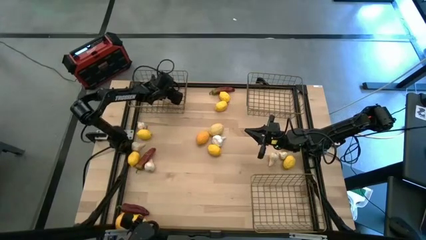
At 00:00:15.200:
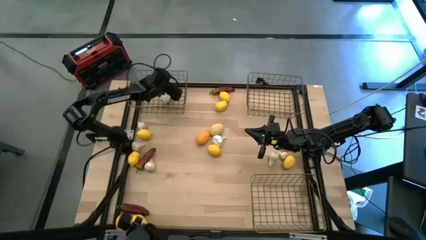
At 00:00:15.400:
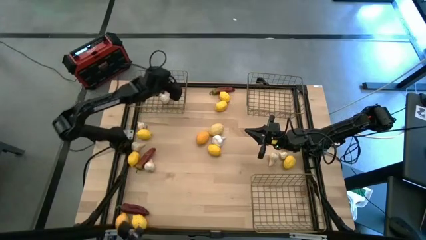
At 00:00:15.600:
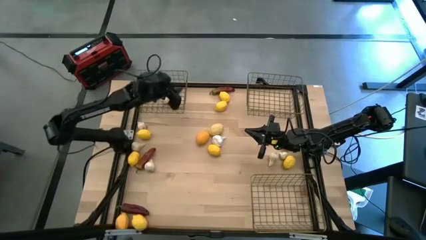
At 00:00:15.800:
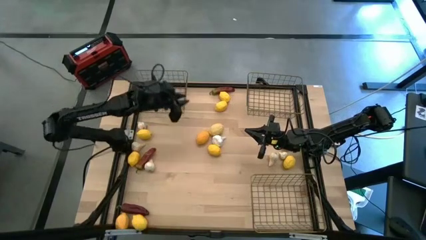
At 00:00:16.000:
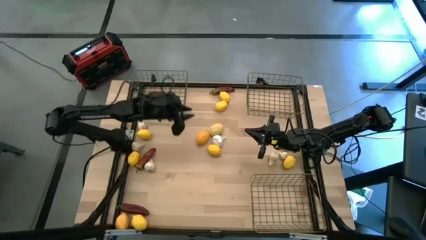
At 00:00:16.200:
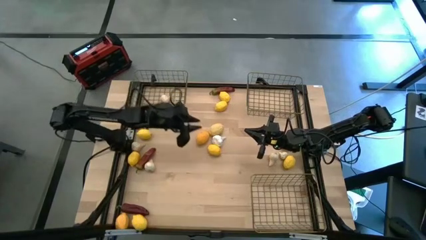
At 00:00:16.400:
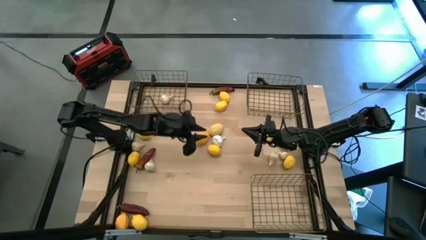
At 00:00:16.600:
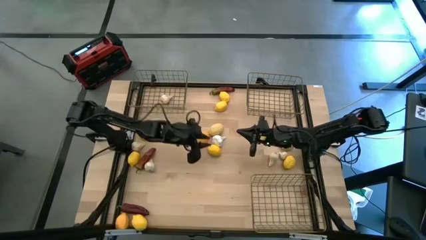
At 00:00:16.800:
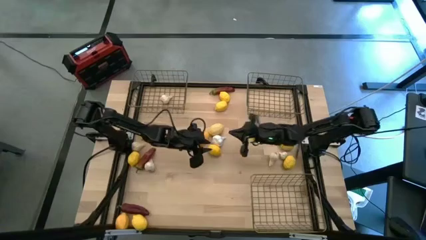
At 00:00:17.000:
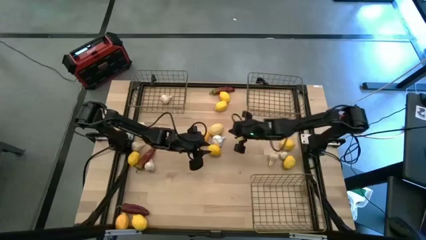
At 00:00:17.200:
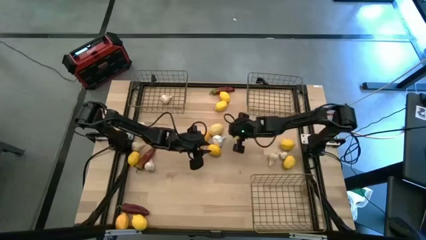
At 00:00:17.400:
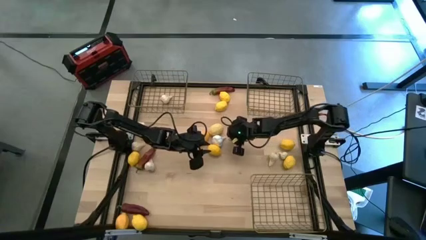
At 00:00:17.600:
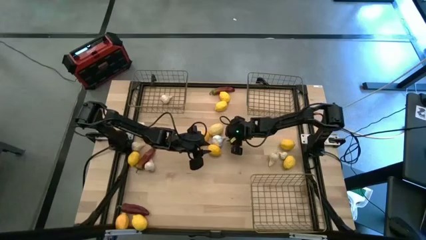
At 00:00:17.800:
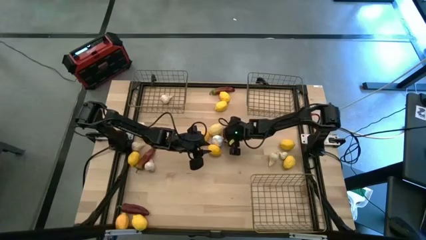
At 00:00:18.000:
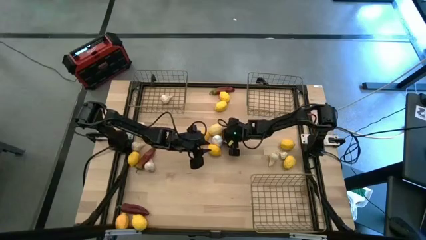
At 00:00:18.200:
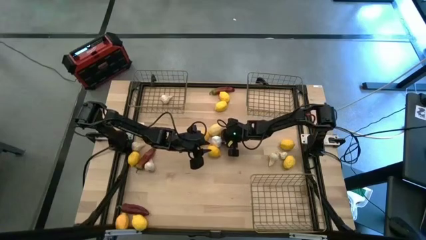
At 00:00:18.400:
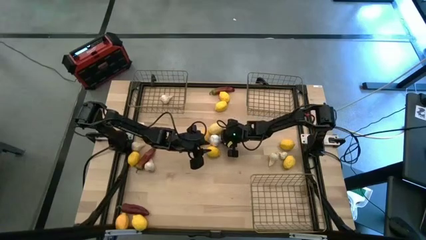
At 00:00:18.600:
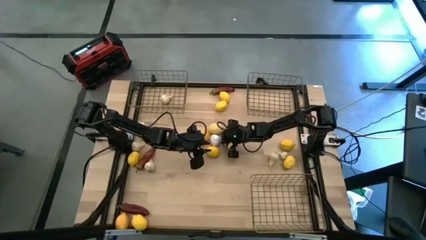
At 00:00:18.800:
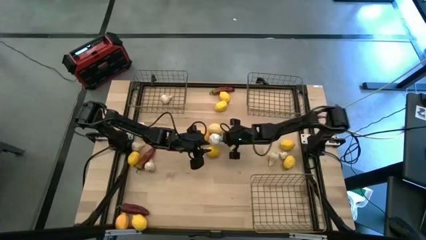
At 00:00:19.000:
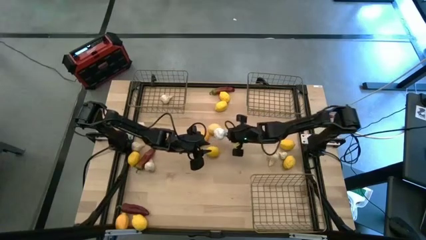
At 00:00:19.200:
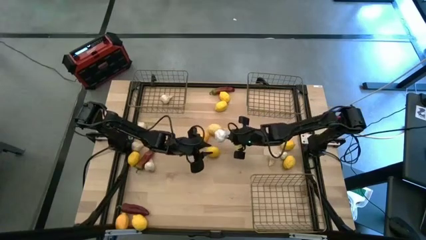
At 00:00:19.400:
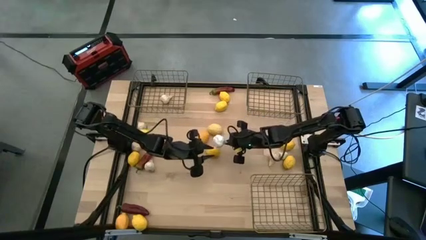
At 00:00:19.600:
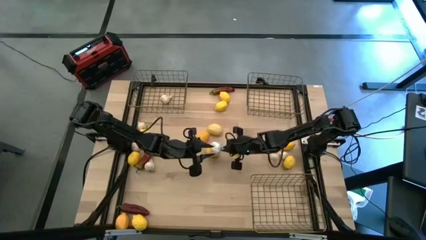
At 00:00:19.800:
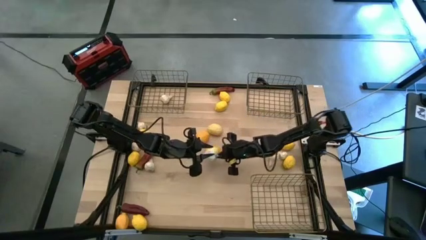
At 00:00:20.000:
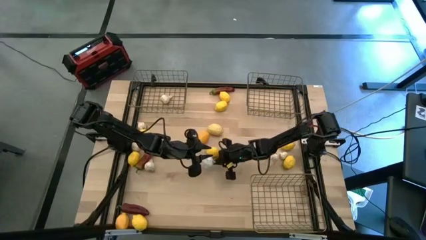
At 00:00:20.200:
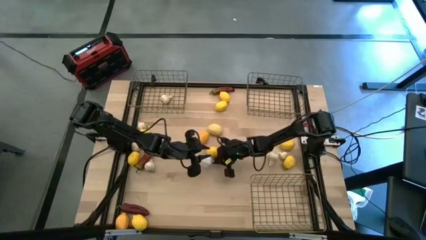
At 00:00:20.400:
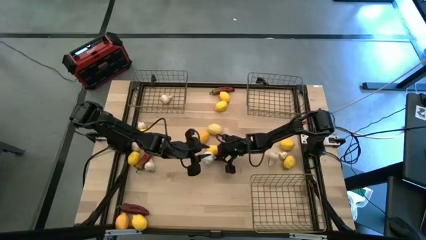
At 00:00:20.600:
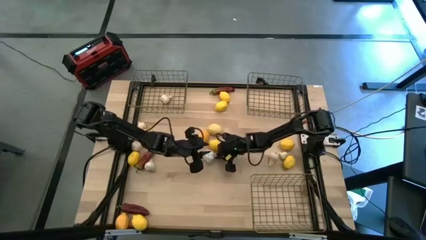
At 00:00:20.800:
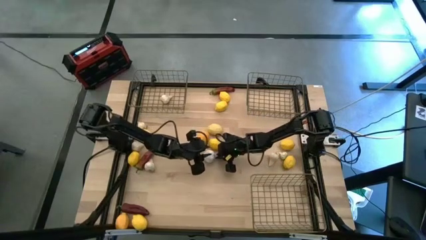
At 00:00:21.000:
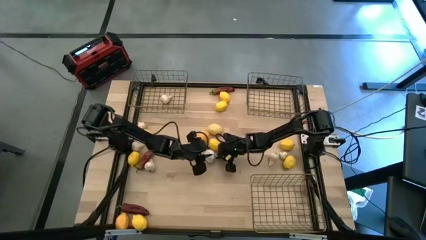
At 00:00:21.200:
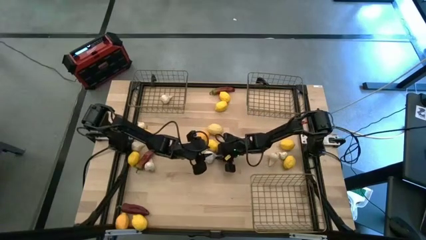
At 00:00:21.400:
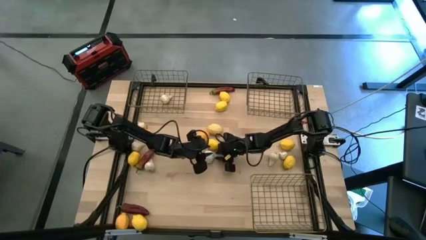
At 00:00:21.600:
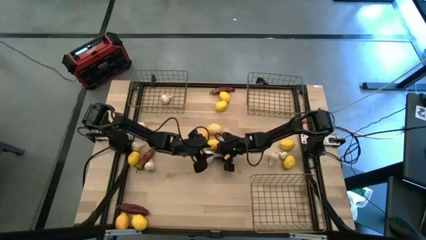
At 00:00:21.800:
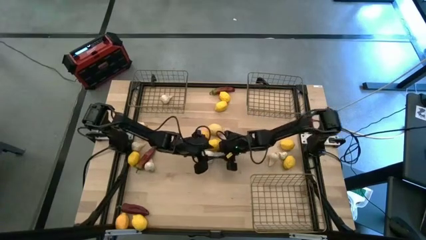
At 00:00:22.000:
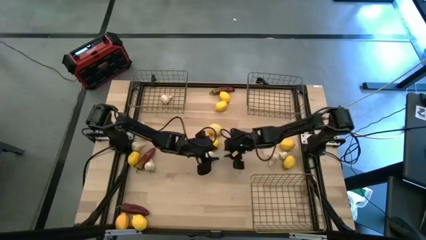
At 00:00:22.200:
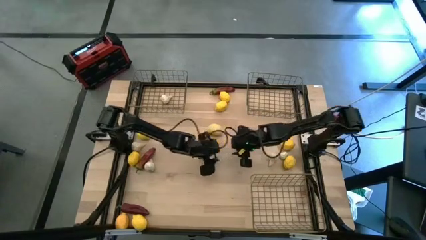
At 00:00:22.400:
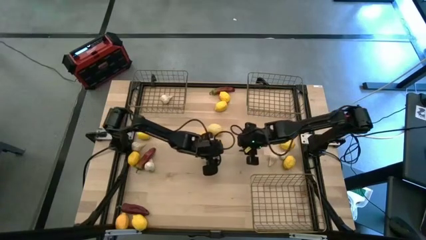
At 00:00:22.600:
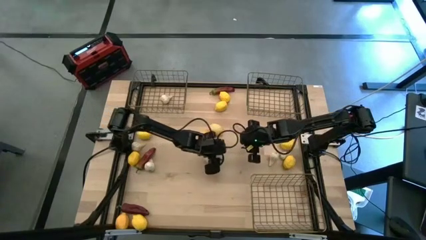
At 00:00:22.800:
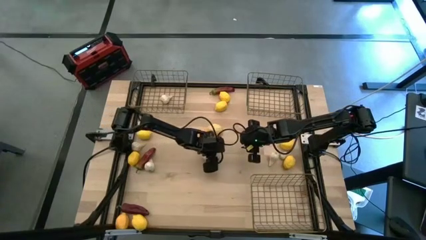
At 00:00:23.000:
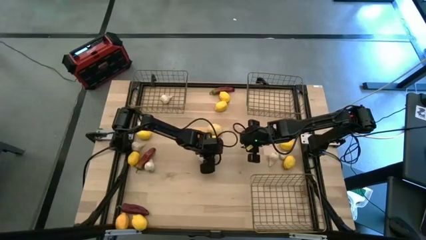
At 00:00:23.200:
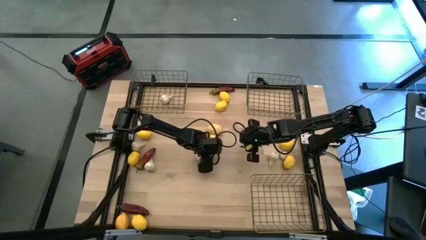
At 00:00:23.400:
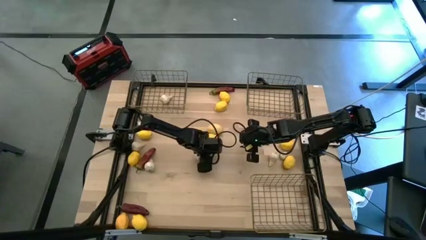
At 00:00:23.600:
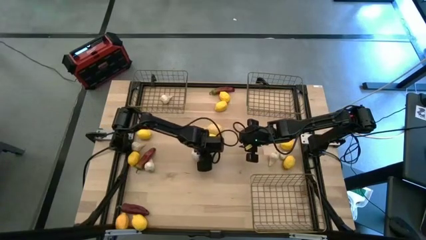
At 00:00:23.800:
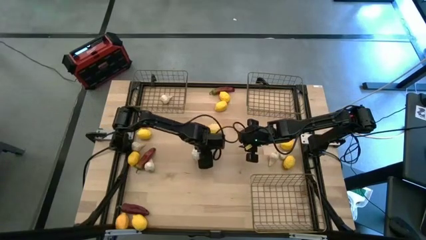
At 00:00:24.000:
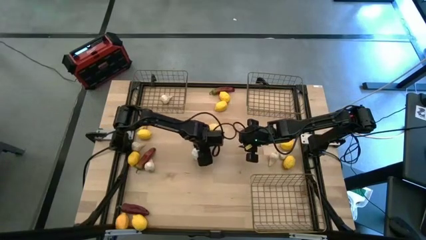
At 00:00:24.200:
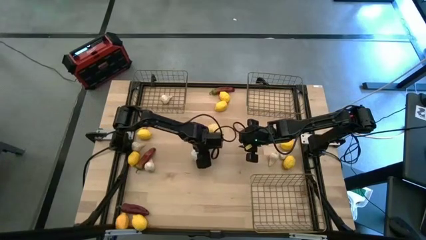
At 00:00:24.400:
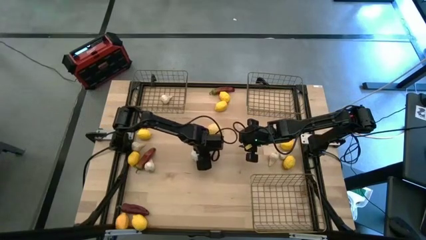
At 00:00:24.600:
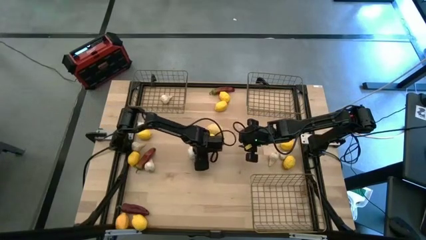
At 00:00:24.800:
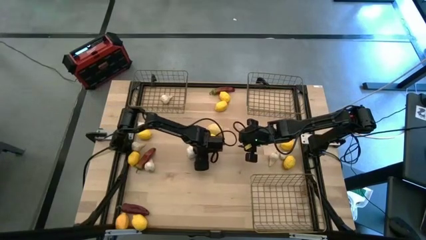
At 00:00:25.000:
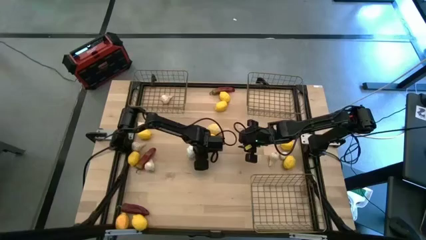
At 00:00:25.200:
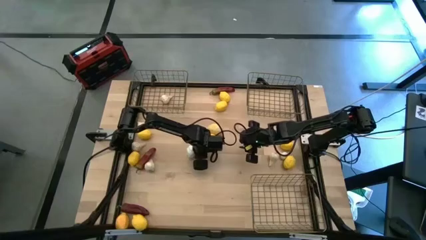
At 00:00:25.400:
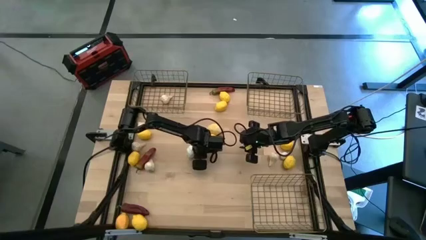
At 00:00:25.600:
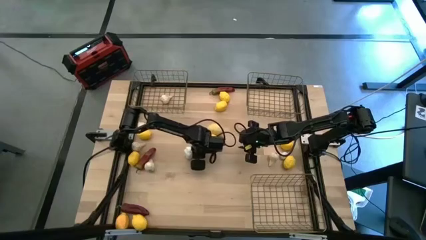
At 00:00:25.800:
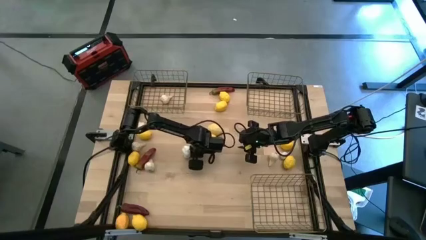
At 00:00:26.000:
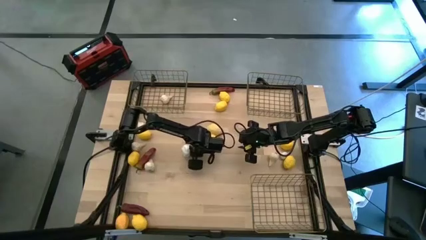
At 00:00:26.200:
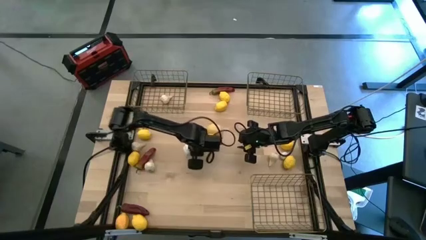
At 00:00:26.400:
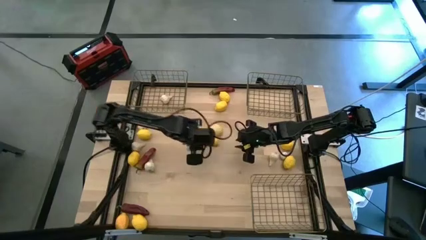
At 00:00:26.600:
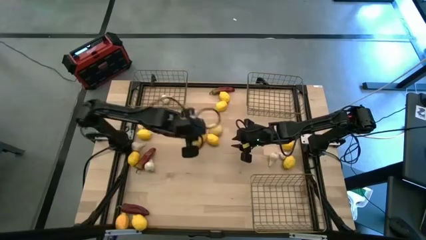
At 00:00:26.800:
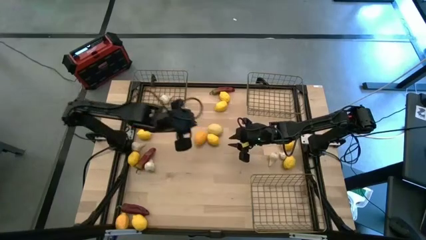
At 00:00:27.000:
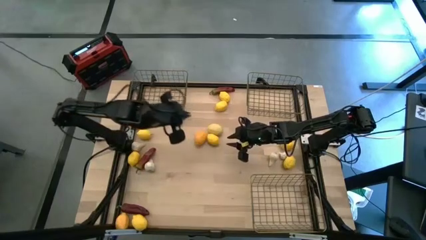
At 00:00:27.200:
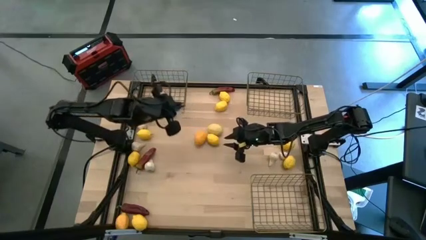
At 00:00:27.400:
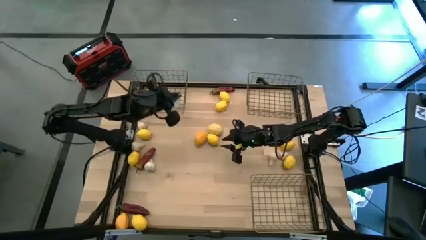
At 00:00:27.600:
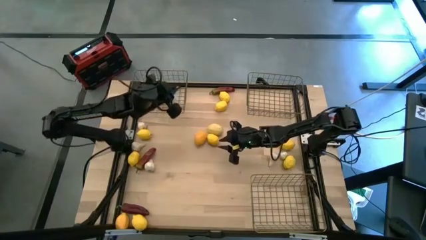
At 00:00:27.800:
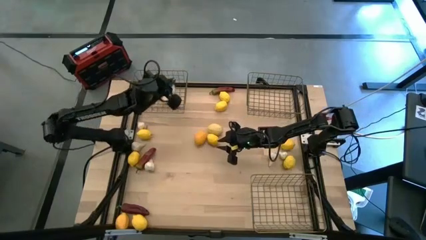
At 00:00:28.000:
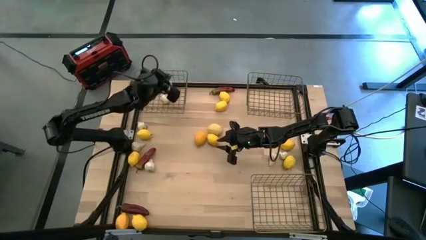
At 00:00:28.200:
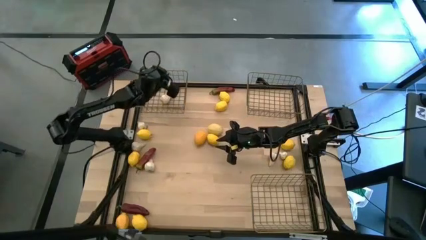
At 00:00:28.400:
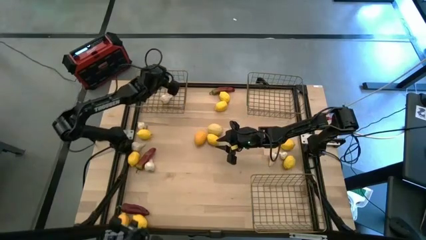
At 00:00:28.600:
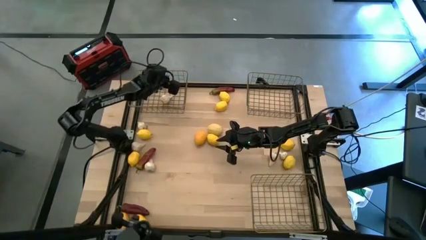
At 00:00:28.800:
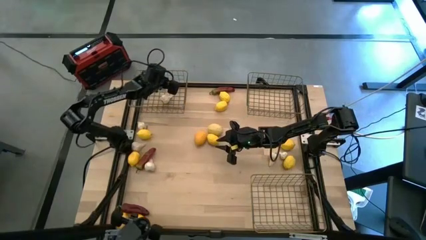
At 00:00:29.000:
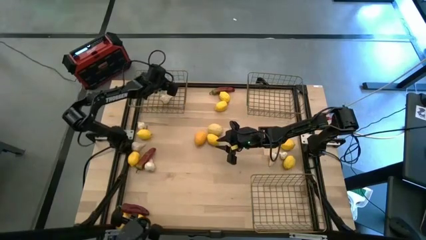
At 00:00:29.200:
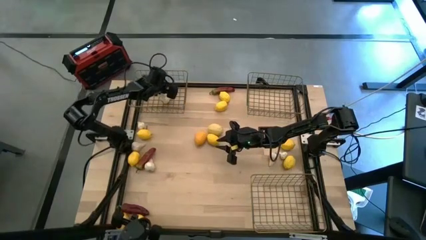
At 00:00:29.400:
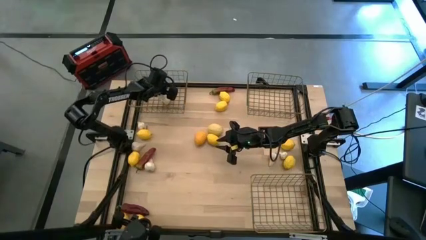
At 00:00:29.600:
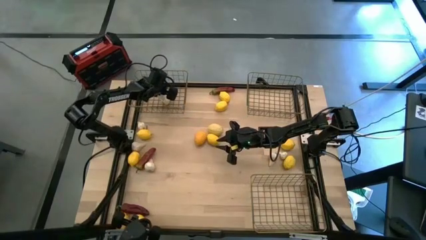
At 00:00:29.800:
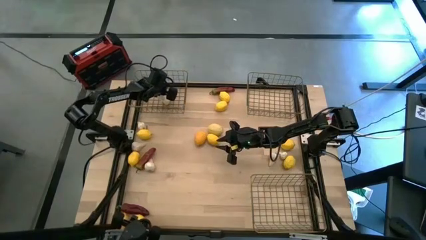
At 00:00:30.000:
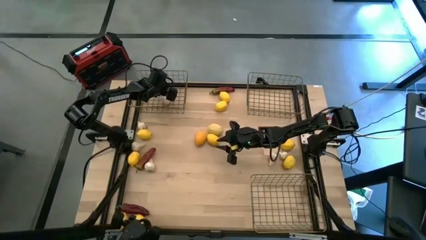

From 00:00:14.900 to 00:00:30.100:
Task: Sort produce into baskets
Put the white garlic into the top left wire basket
